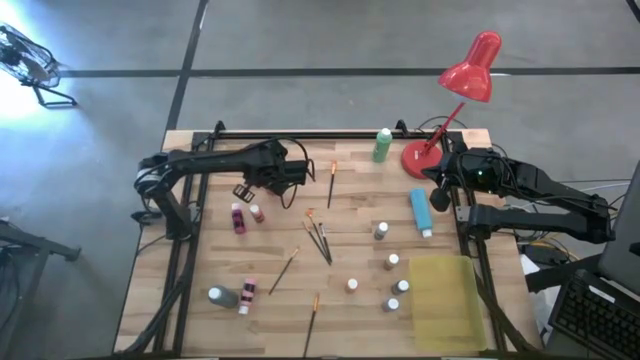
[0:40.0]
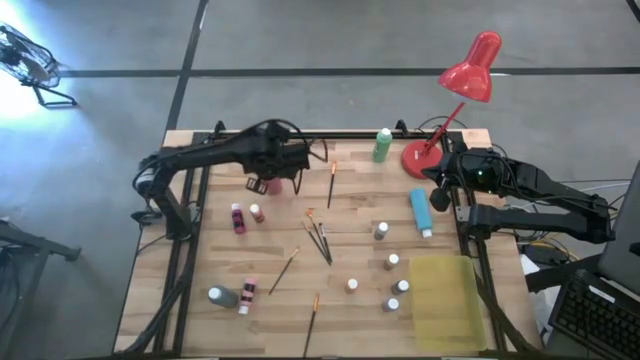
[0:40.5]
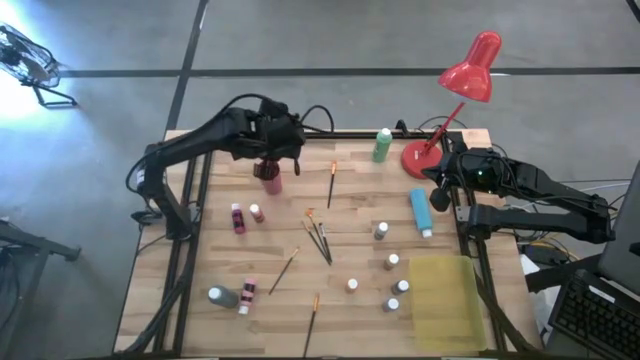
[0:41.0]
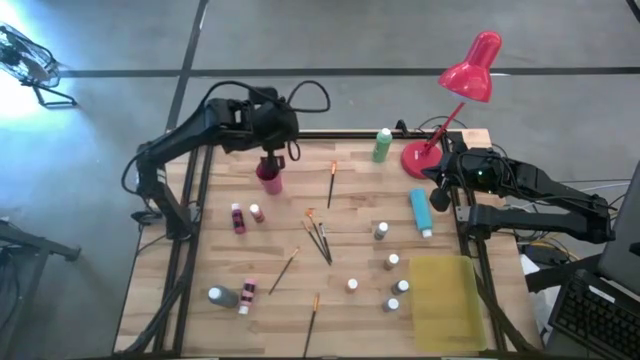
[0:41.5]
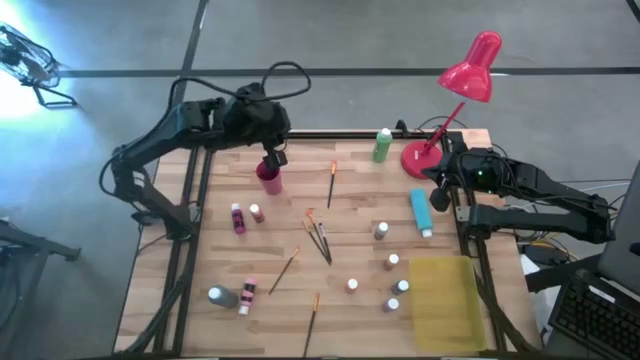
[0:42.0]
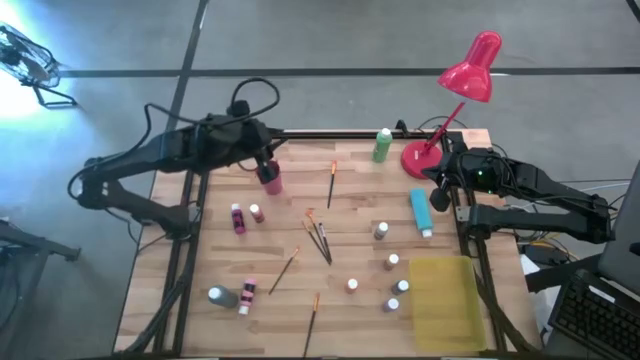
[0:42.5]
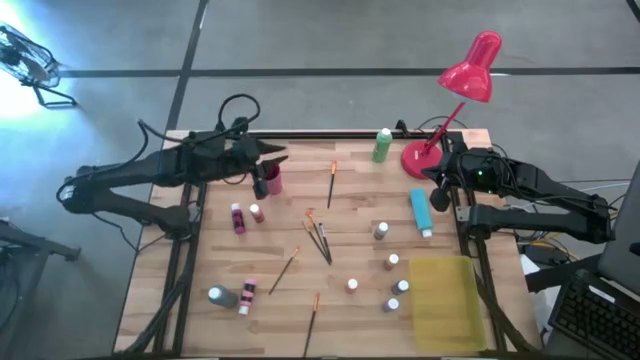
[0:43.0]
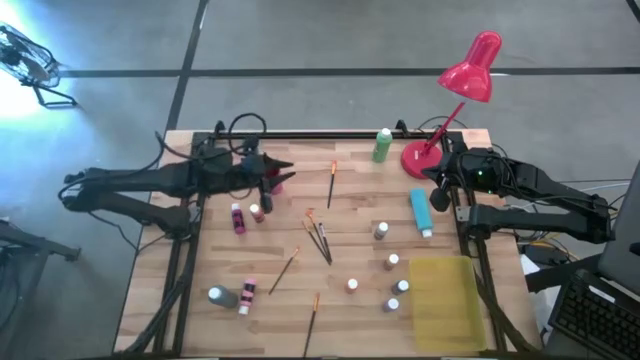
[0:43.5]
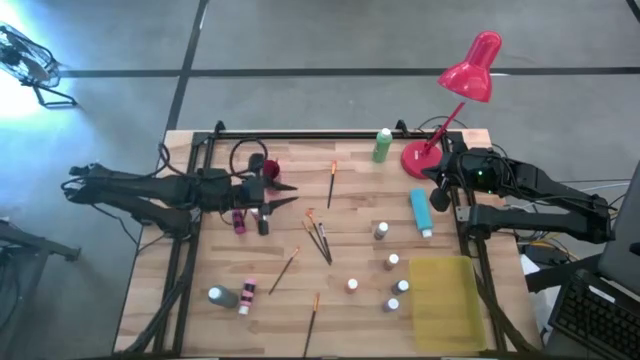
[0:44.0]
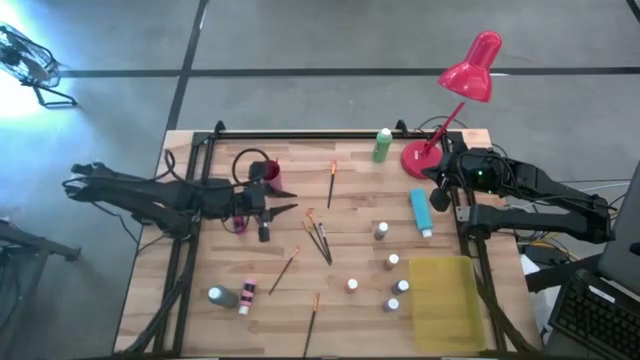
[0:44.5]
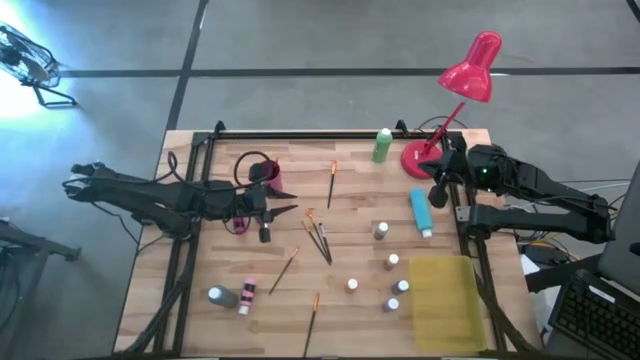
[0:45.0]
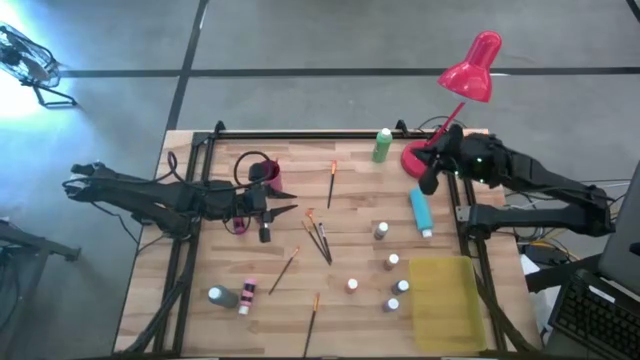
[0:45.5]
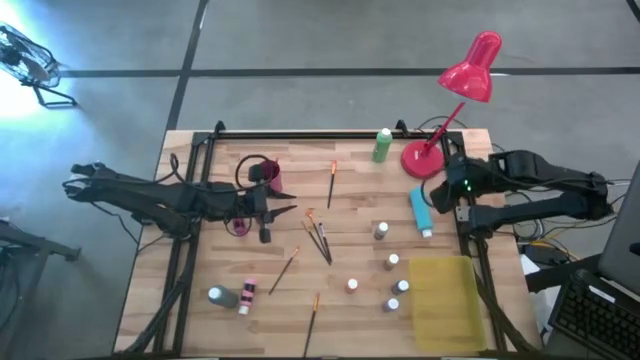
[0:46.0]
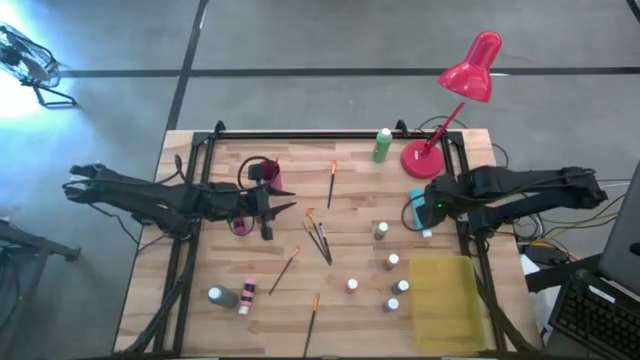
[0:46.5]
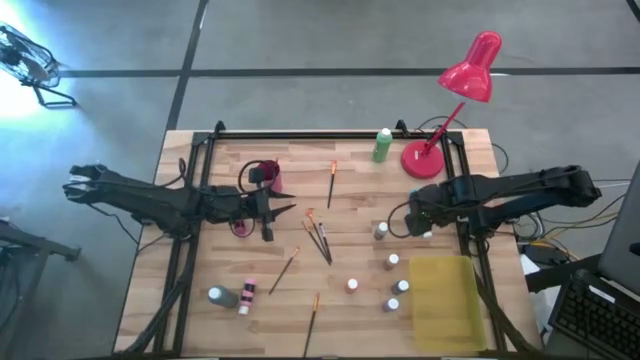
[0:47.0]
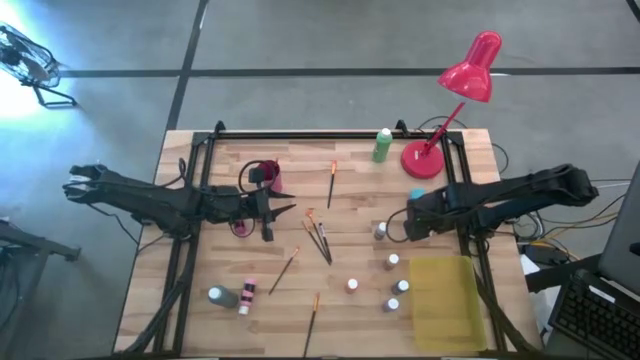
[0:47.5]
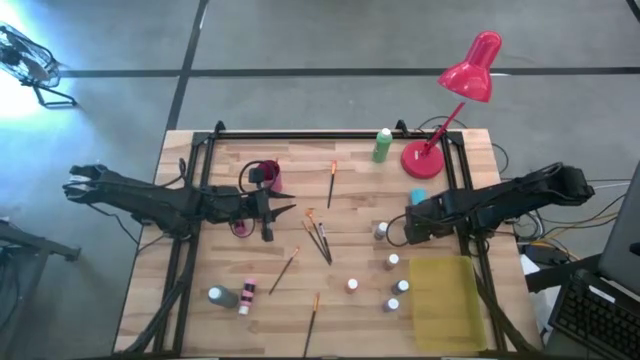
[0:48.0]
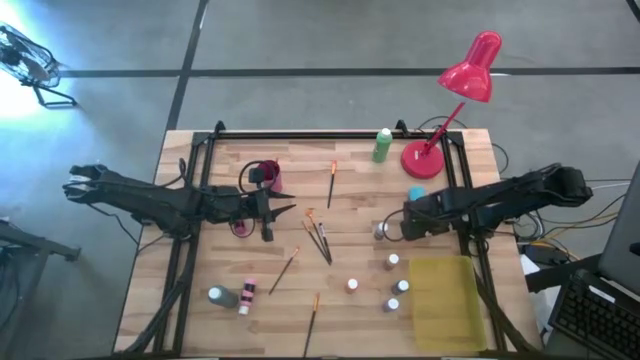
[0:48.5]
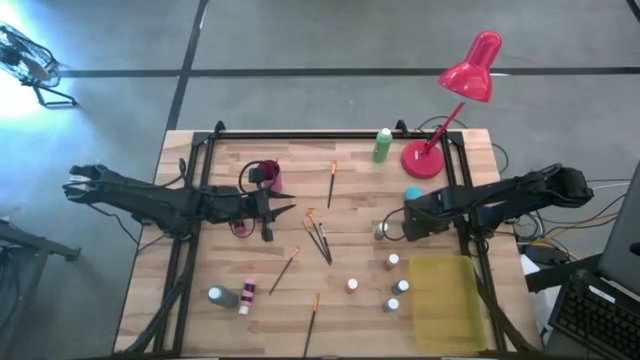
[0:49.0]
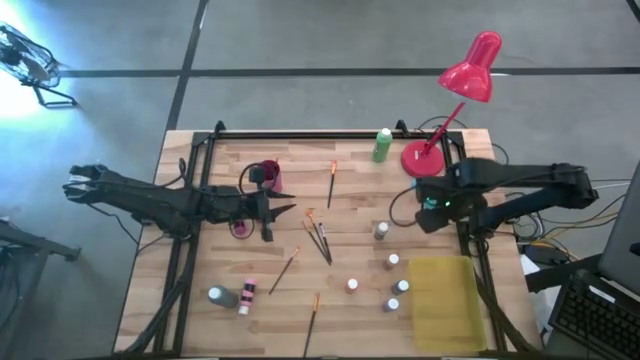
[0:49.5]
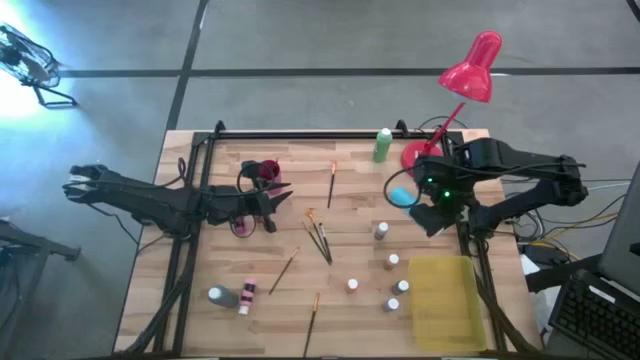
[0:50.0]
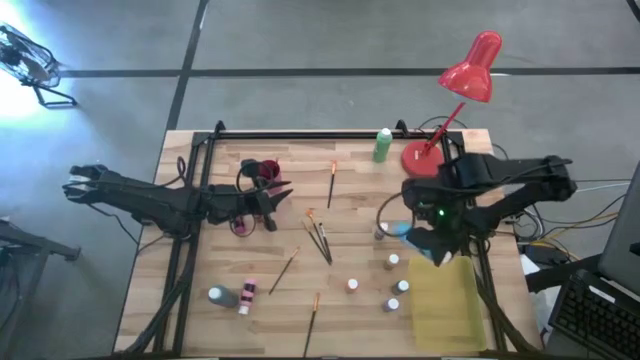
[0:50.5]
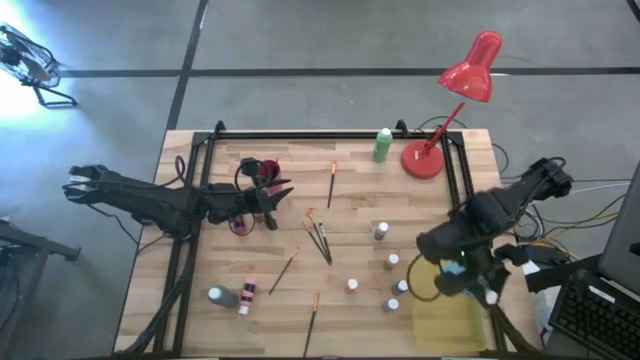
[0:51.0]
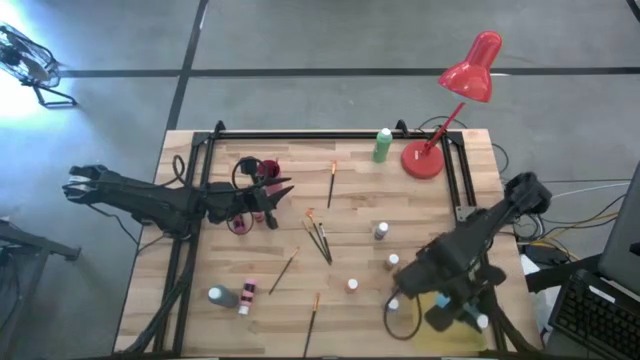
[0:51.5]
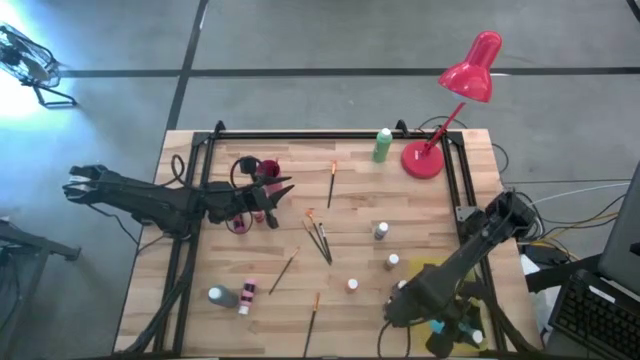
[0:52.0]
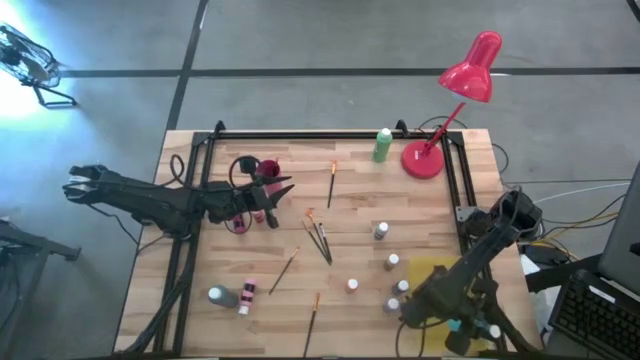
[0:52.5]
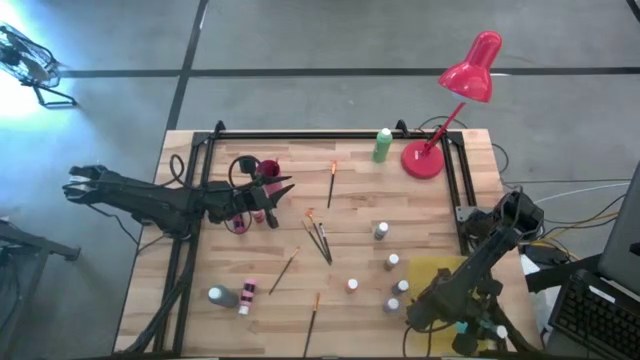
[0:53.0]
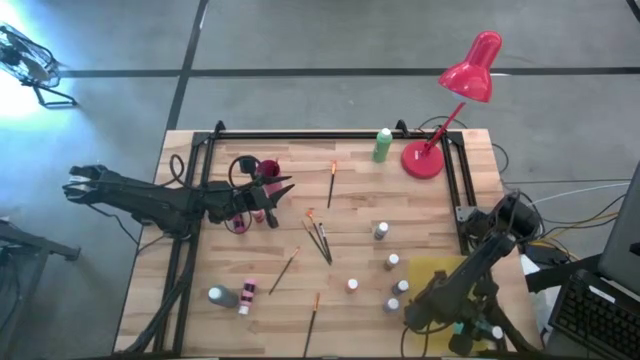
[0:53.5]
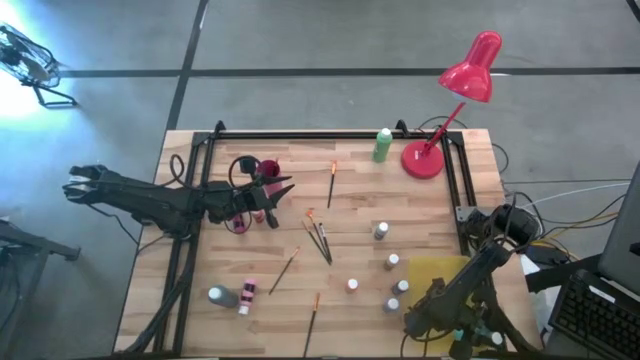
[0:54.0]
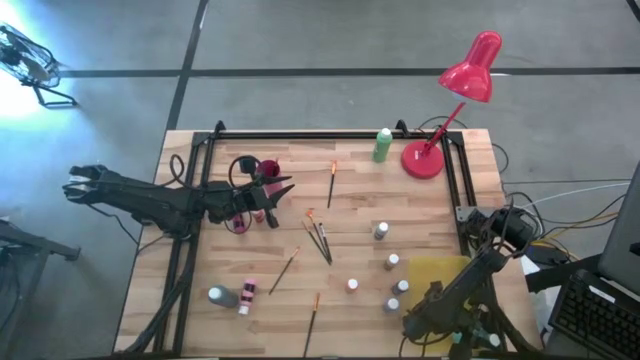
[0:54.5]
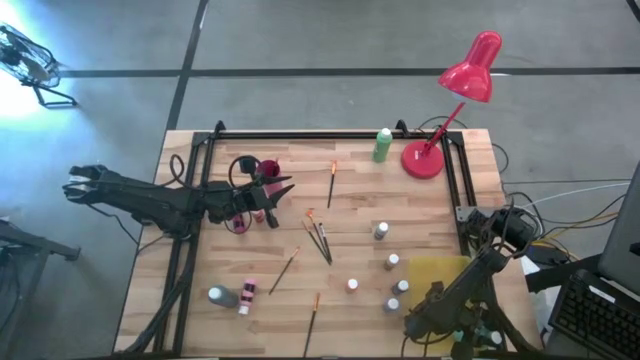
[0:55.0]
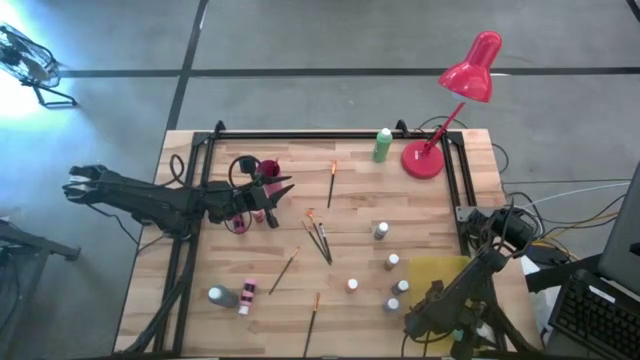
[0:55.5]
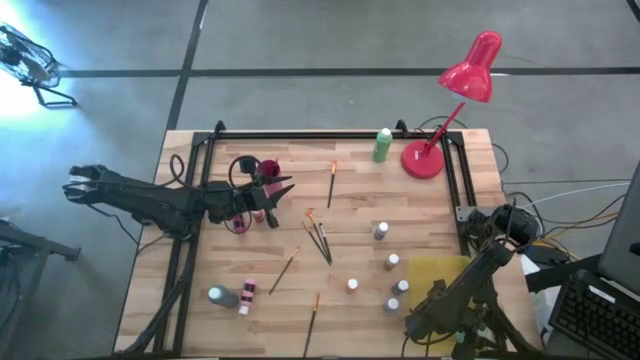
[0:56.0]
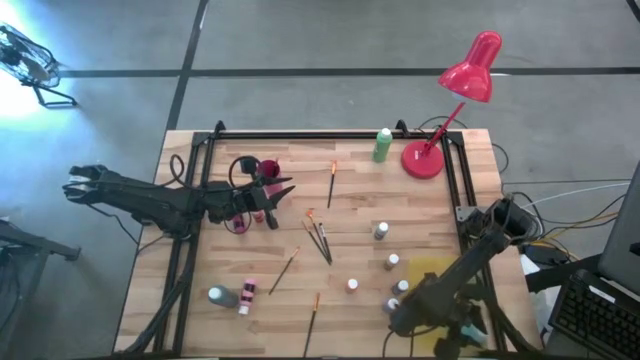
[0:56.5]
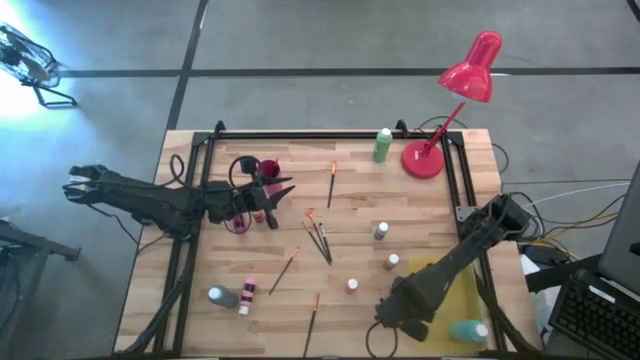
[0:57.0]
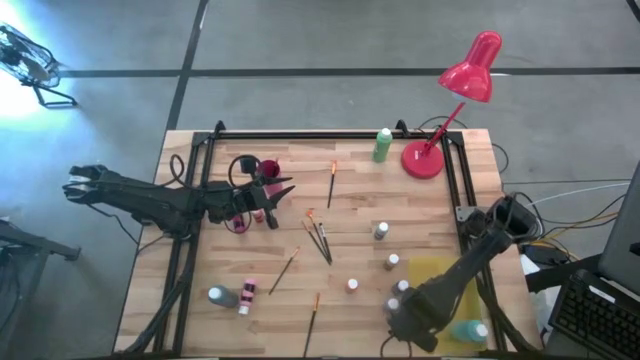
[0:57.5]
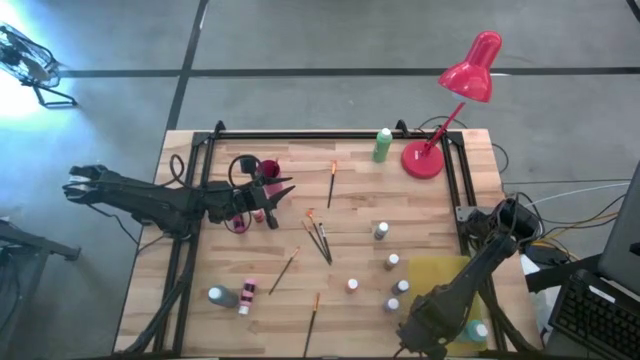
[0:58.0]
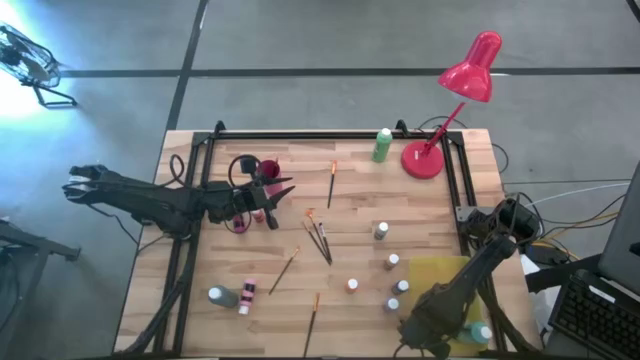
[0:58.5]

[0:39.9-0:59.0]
Task: Pick & Place Paint Supplies
Put the light blue paint bottle into the yellow bin
